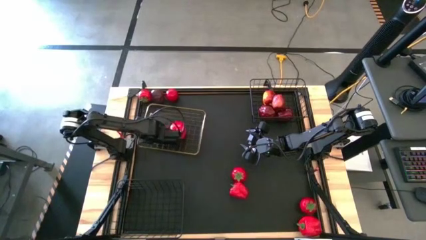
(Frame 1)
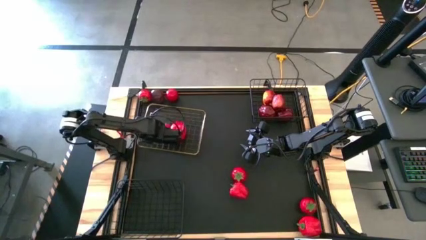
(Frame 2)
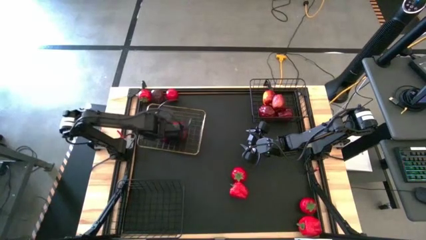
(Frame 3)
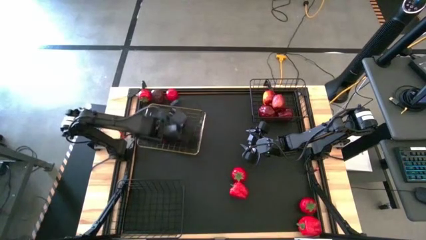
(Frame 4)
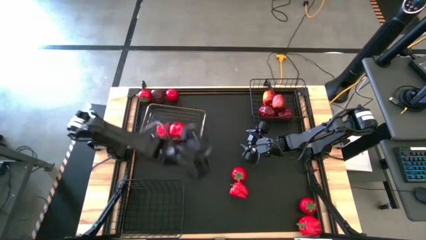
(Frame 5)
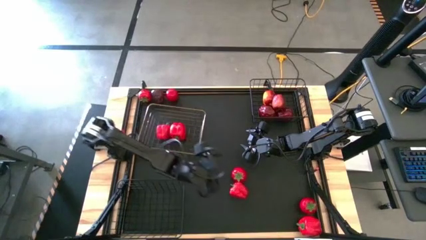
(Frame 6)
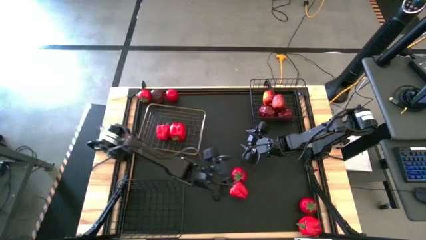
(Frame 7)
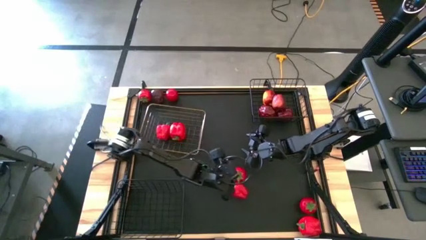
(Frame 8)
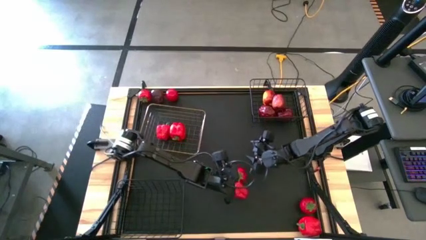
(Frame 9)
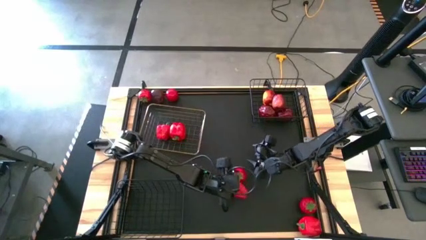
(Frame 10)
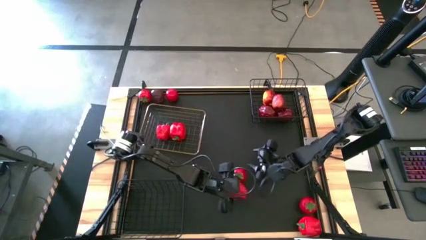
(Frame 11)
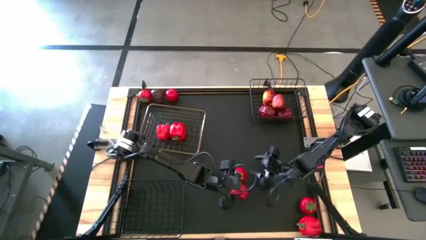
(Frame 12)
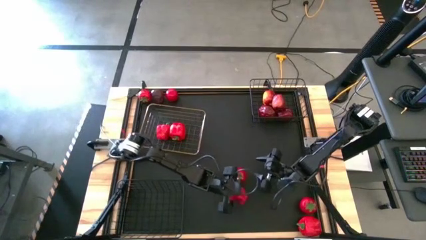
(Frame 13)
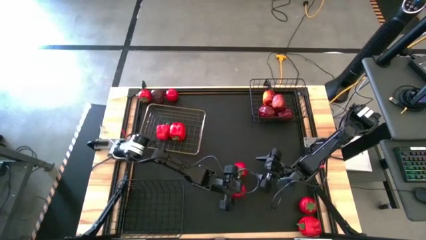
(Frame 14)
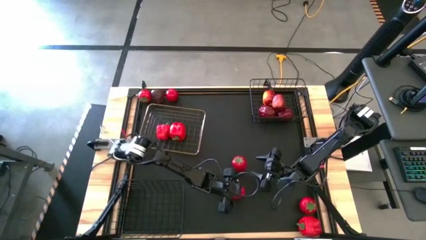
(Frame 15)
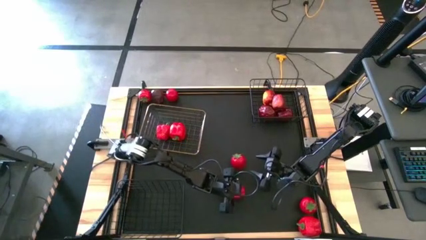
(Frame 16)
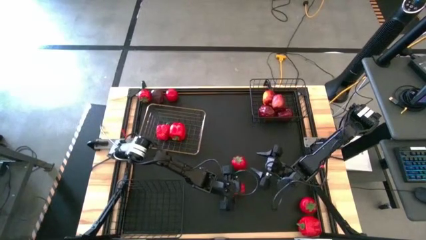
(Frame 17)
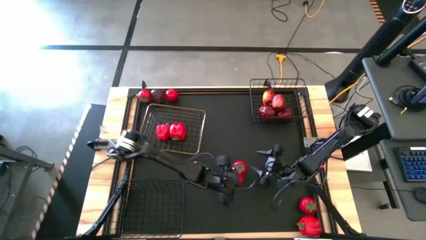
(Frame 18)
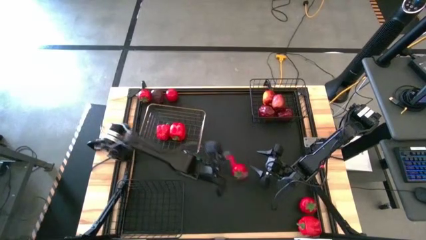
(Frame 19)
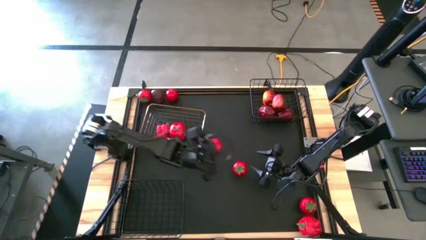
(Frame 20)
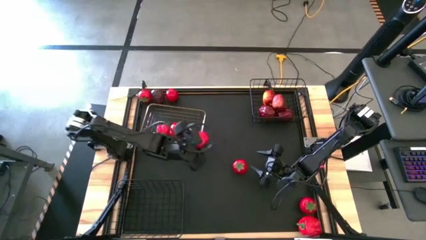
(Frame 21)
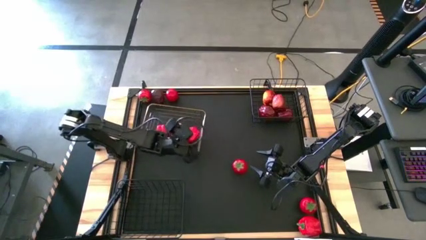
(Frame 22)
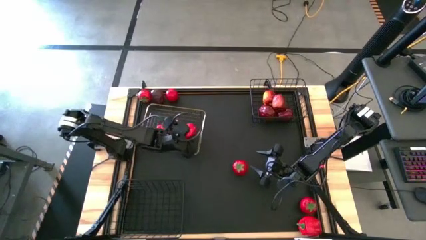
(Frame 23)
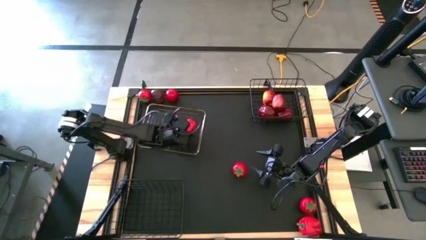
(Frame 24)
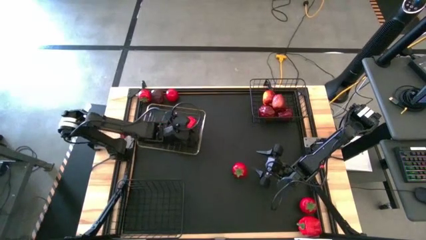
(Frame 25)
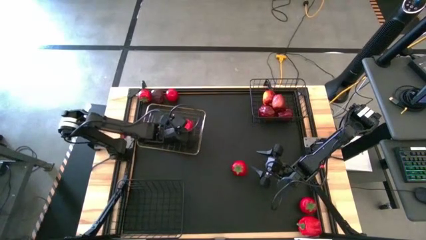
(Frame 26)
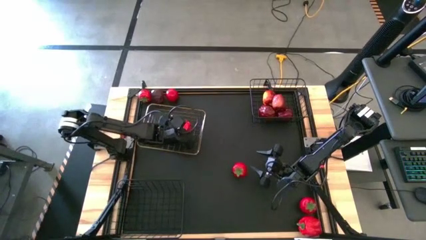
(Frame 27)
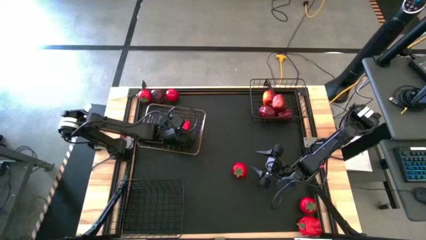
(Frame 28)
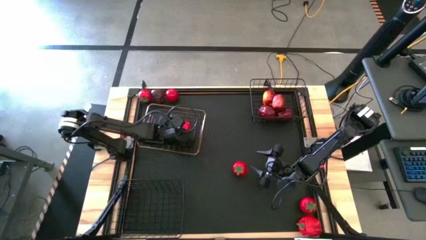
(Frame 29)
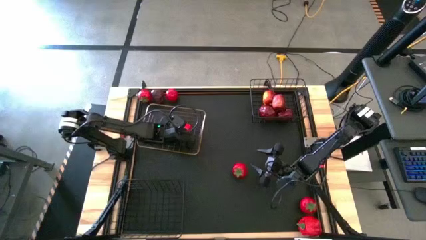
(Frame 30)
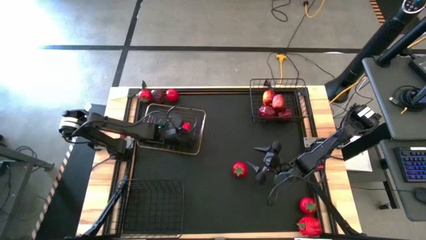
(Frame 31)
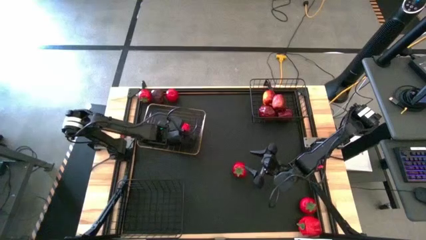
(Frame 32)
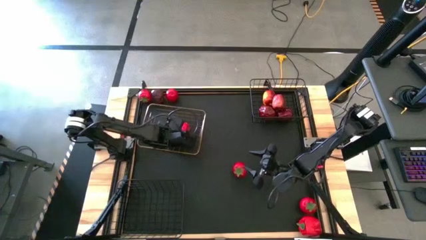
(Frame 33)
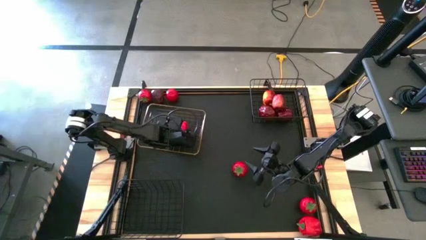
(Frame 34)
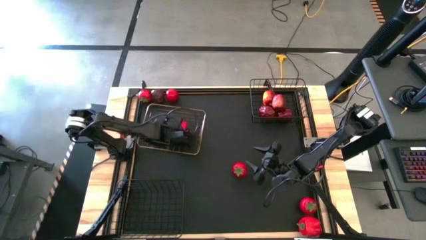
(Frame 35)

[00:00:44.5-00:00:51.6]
Task: Sort produce into baskets
Put the bottom center bell pepper into the golden basket

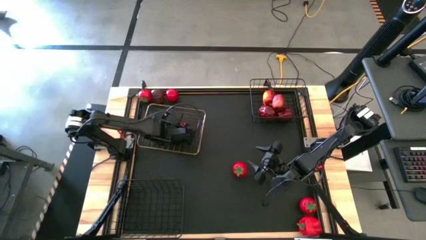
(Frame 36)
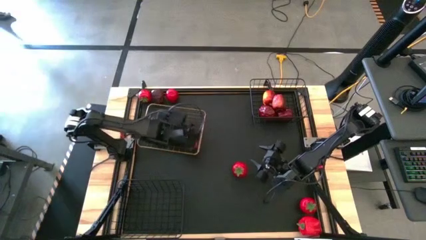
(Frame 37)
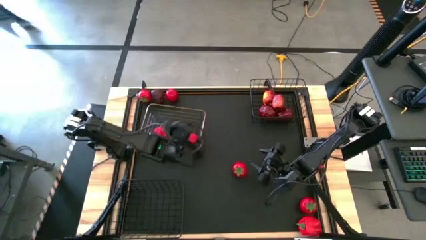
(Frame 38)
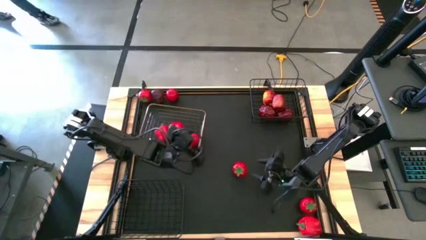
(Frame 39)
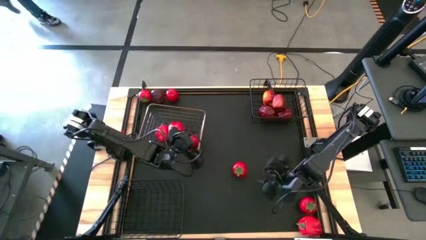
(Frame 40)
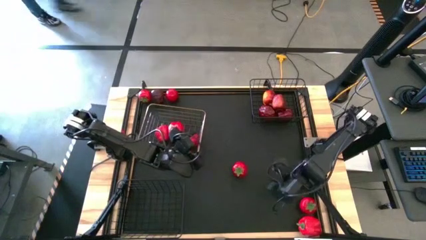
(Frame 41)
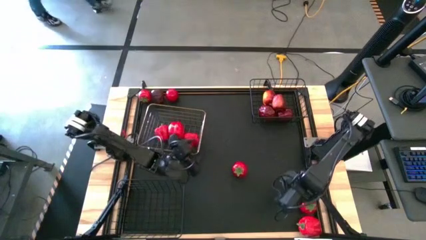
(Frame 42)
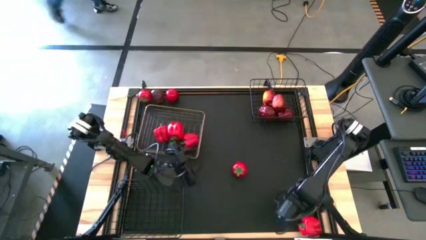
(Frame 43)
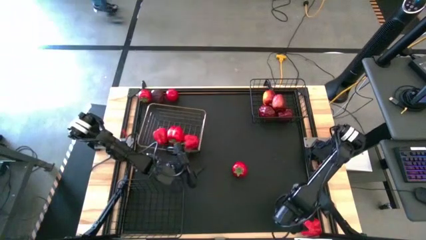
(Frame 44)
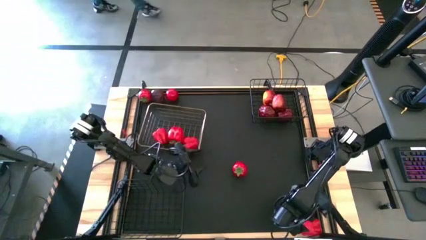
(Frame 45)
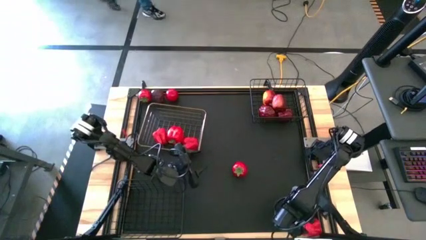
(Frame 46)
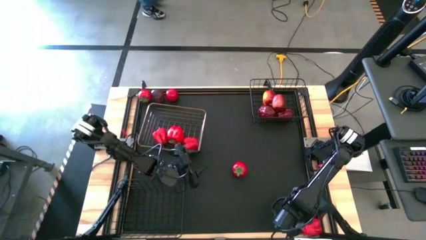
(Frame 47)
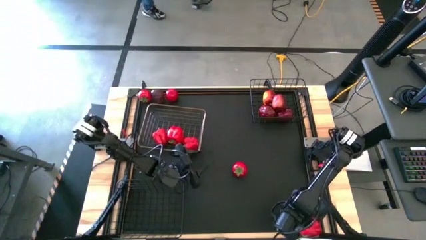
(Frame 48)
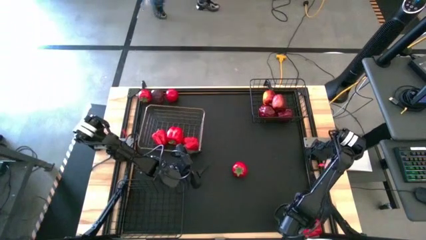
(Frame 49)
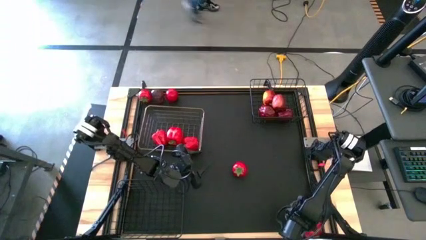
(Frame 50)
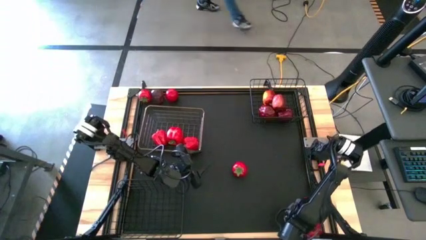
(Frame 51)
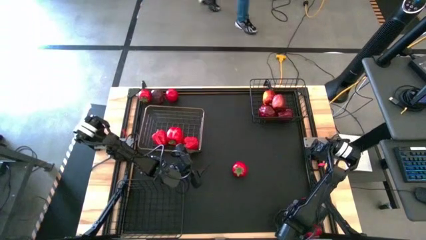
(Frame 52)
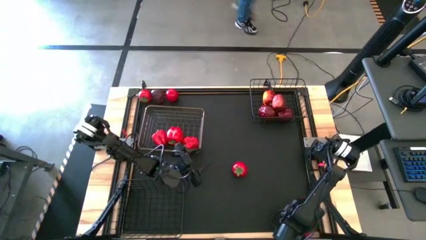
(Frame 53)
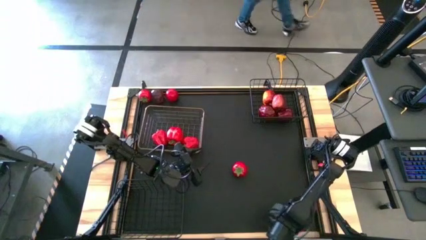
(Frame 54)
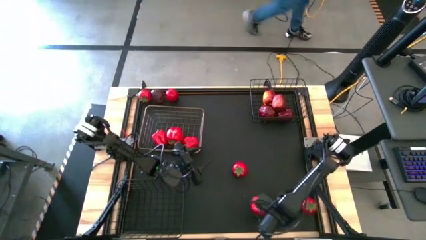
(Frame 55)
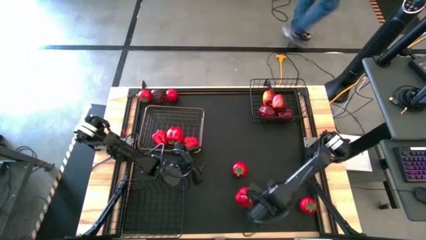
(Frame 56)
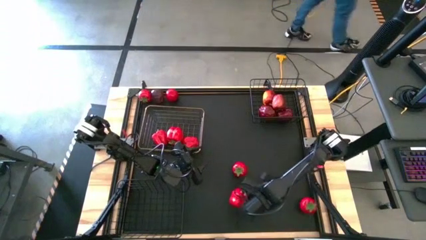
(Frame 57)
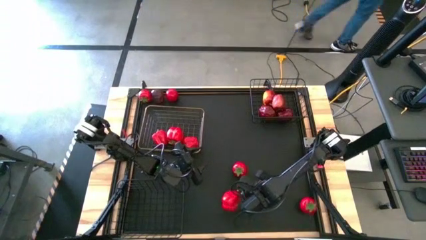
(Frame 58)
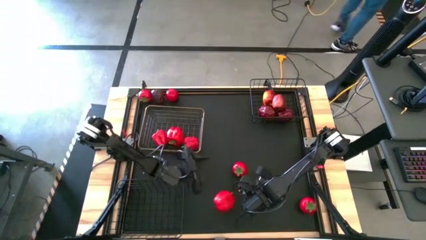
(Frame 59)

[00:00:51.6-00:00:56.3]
Move the bottom right bell pepper to the bottom center of the table

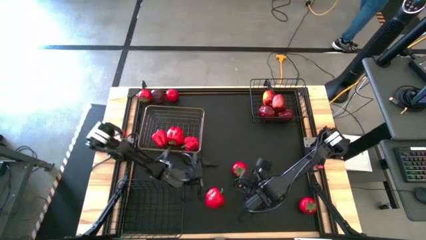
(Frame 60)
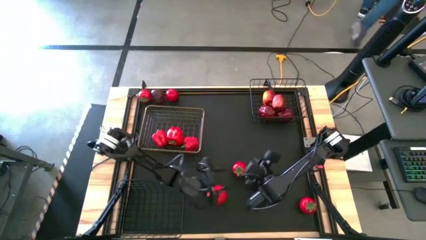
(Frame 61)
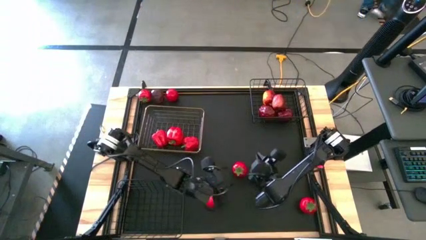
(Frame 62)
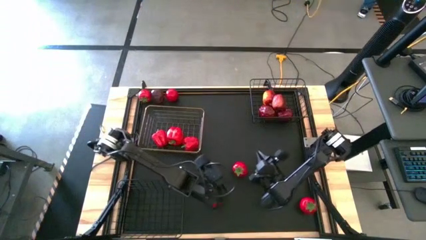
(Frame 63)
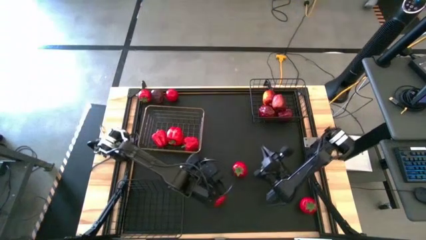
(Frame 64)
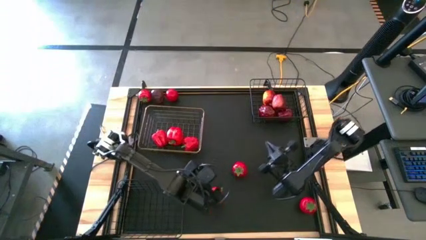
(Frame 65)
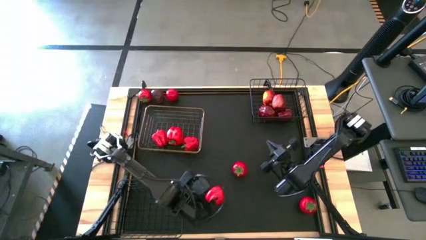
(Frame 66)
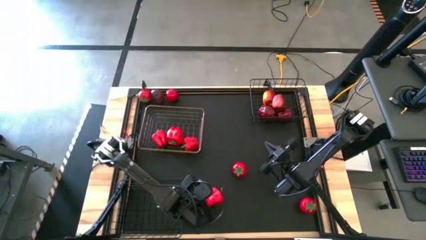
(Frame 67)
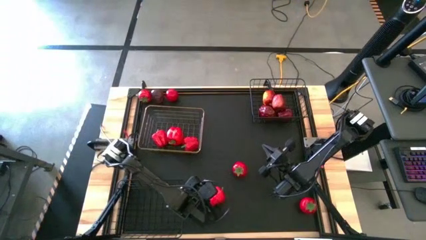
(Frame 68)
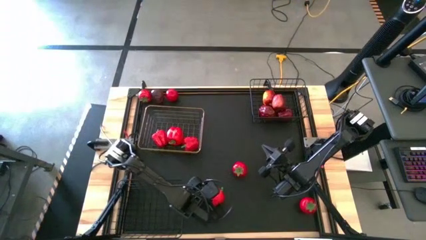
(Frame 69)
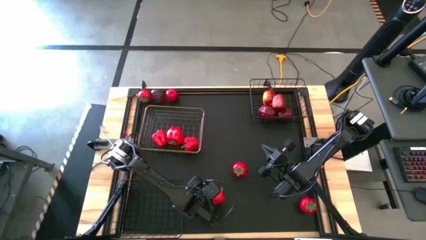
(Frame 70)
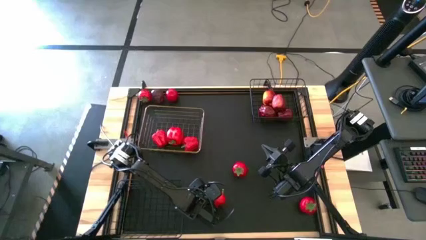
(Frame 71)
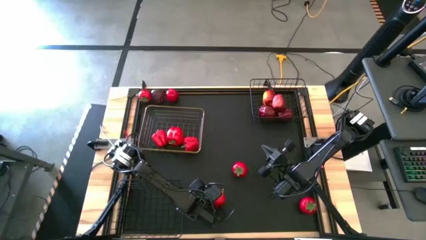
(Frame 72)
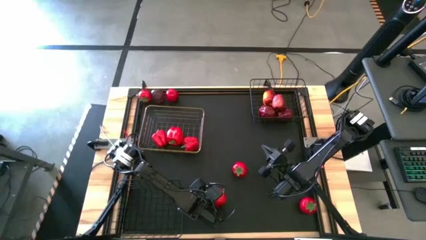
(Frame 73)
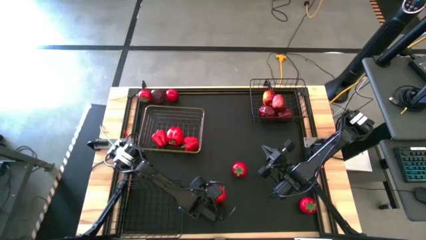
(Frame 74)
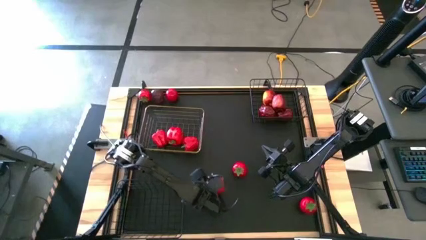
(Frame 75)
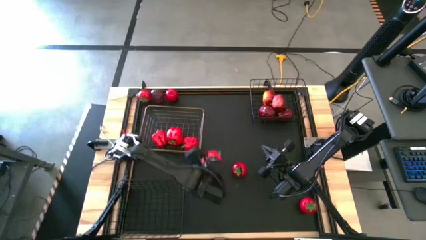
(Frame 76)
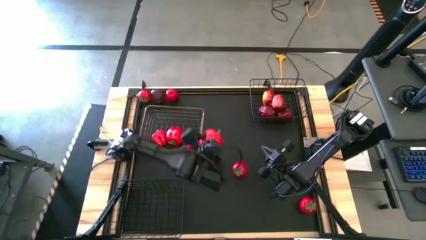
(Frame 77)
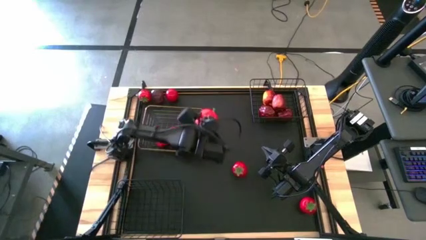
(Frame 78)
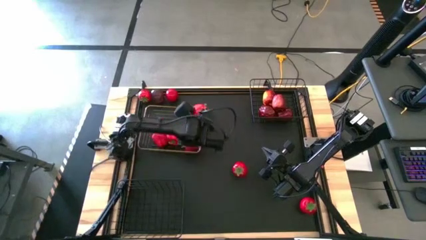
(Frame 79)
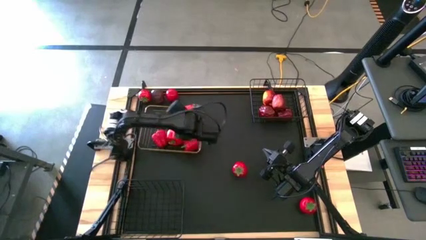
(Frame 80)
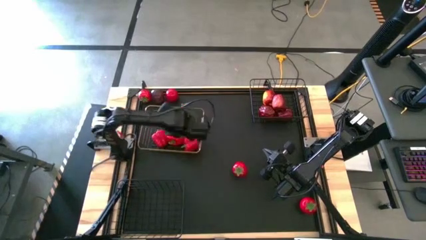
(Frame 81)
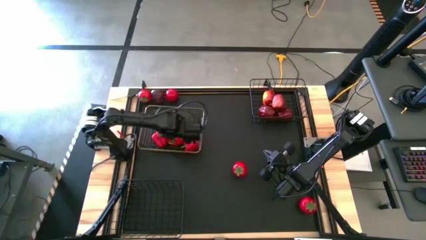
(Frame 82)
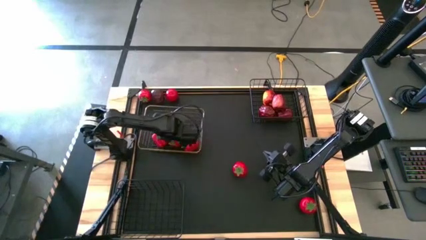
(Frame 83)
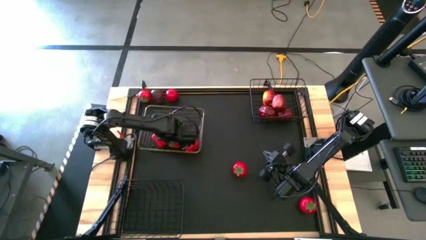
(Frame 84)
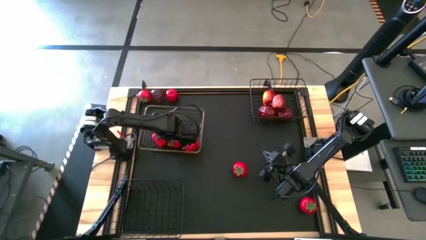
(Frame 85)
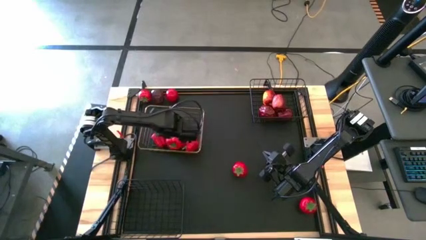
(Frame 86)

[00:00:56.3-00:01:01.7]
Put the bottom center bell pepper into the golden basket
